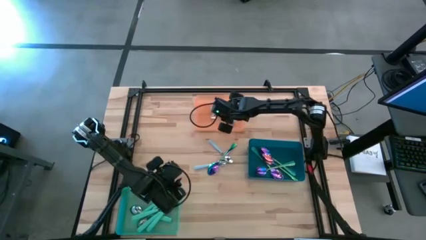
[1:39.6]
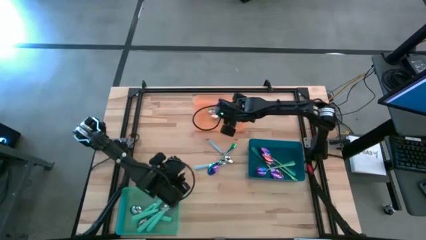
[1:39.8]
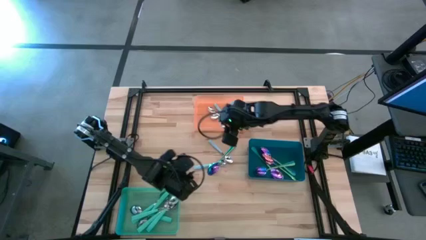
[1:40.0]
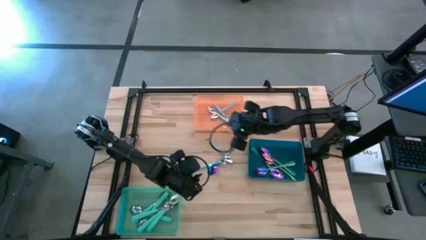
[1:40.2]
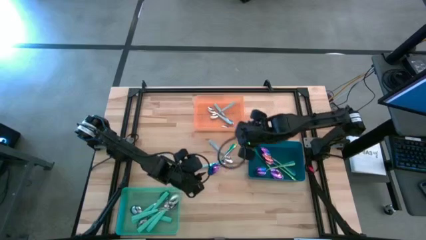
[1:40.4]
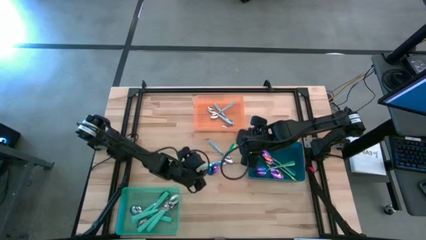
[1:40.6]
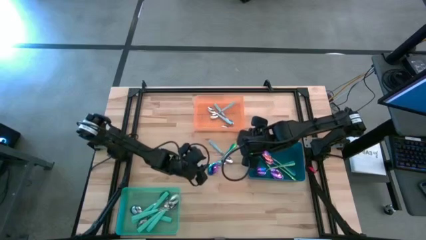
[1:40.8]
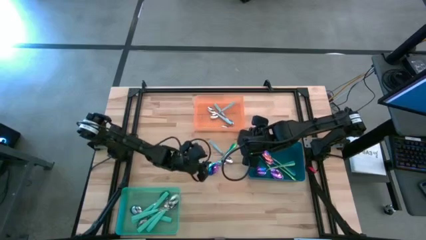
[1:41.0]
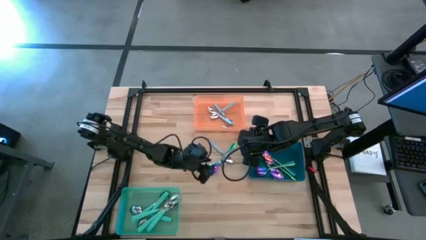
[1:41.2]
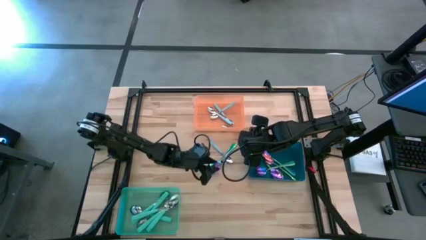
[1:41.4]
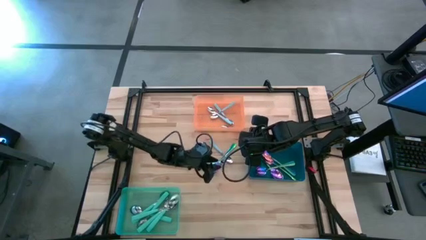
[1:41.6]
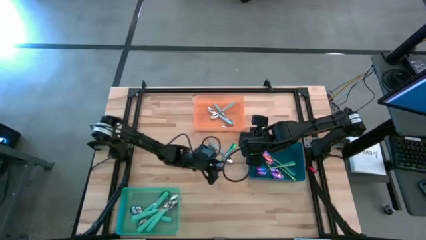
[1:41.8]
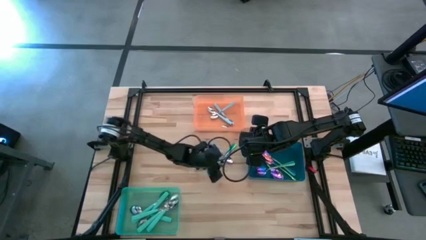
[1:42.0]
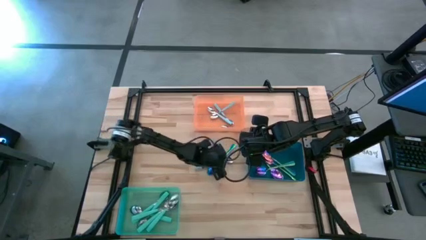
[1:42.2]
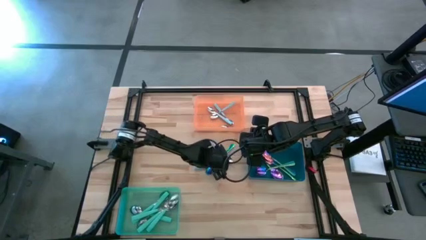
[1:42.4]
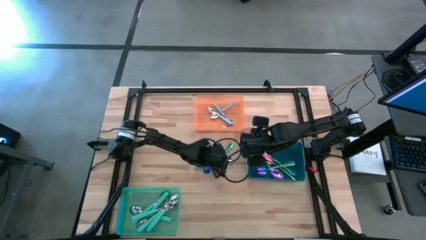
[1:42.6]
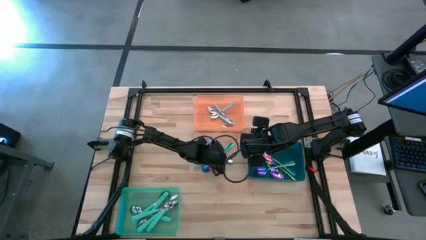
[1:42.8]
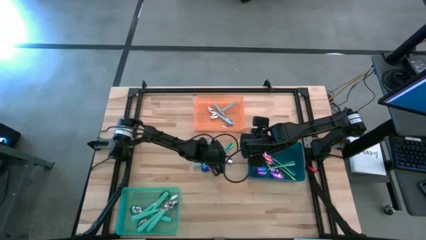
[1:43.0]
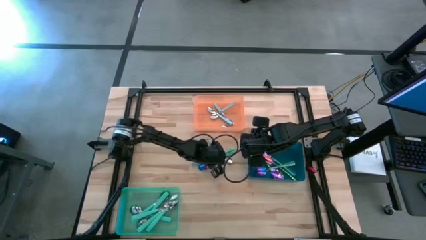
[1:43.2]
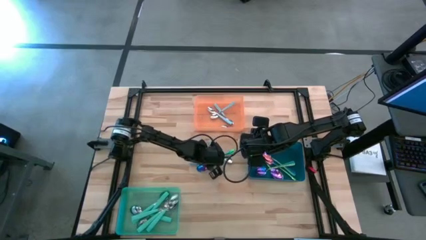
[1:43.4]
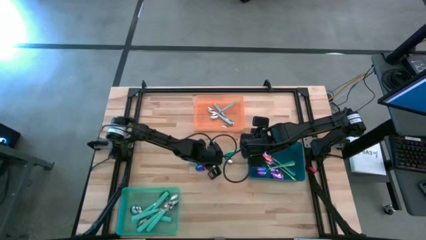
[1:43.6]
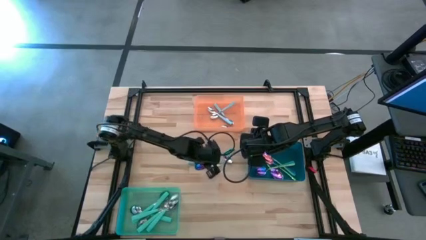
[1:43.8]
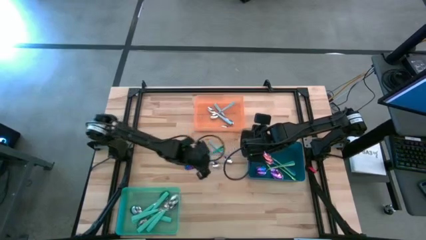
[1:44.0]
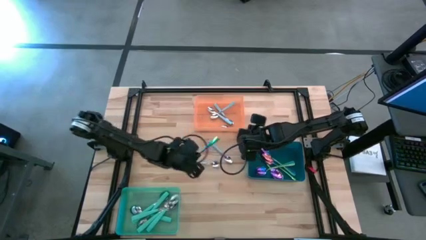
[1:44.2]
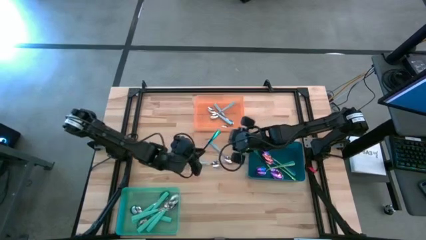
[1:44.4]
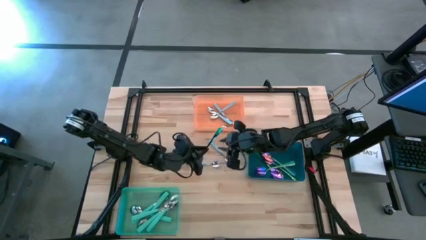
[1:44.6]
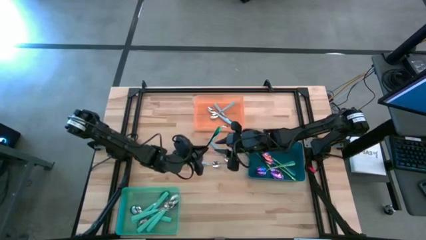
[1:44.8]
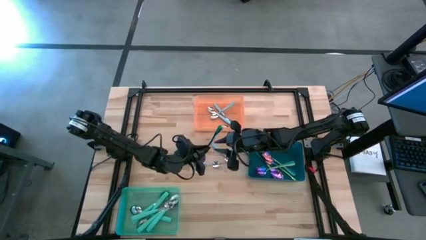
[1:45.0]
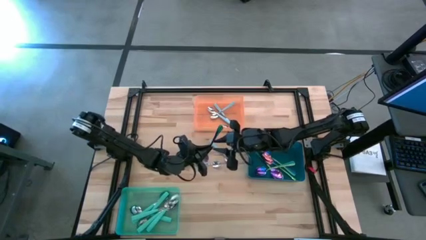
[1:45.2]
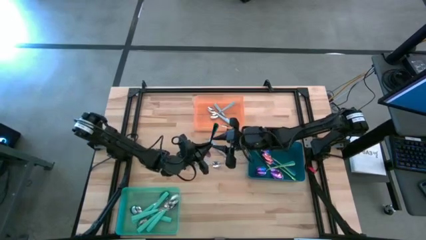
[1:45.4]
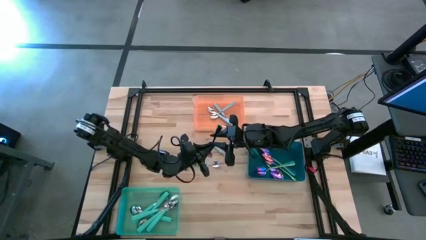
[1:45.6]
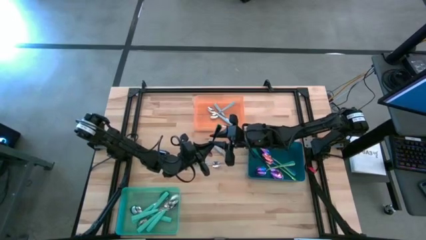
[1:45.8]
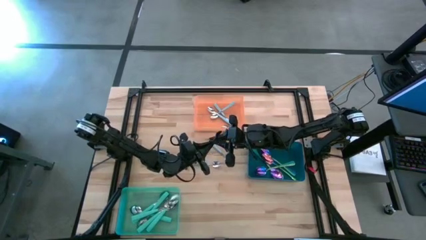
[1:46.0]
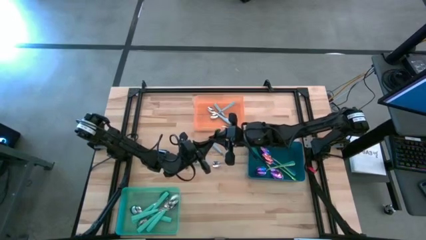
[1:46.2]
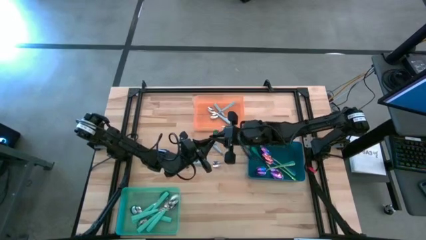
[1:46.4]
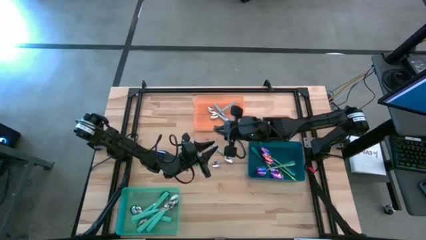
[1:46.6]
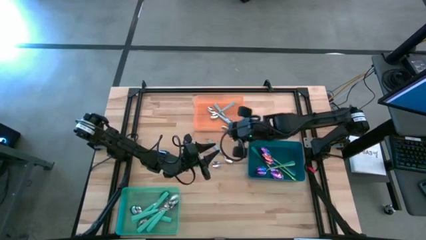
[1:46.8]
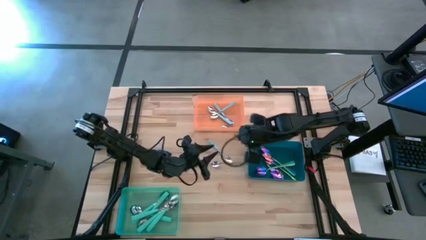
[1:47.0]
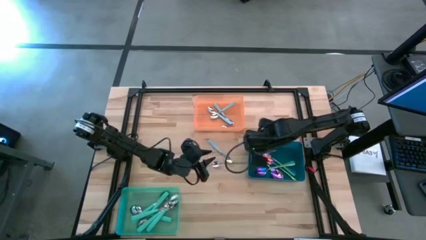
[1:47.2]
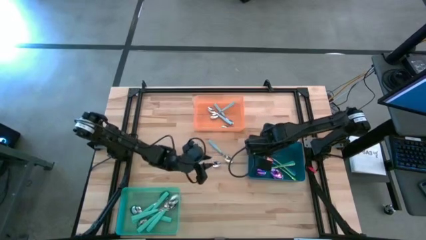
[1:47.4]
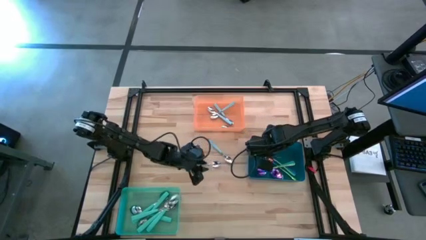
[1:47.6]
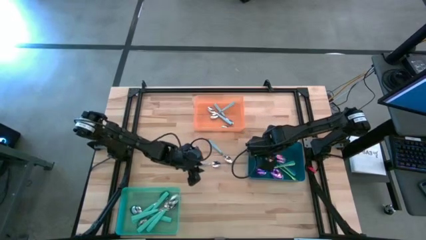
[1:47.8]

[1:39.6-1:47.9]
Task: Sort silverware by color (type)
Put the purple spoon into the blue bin

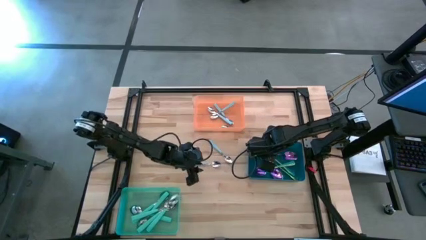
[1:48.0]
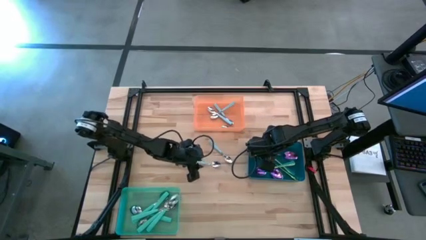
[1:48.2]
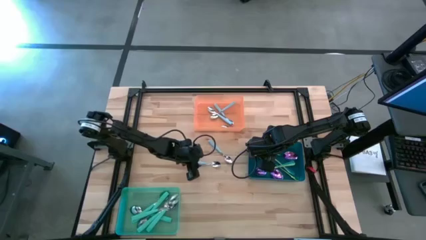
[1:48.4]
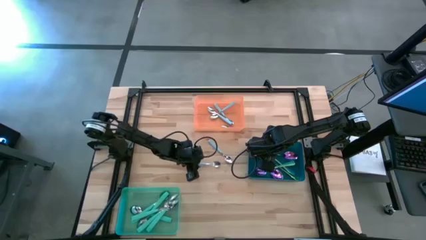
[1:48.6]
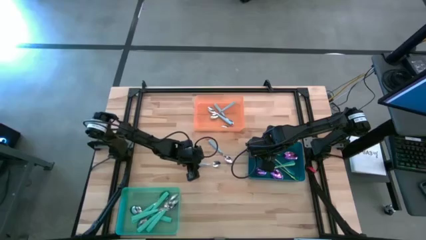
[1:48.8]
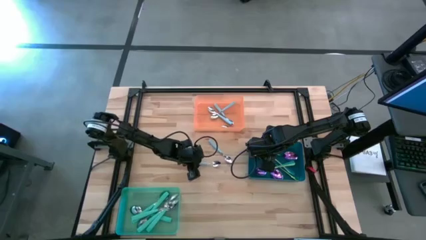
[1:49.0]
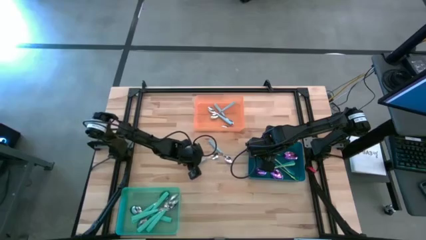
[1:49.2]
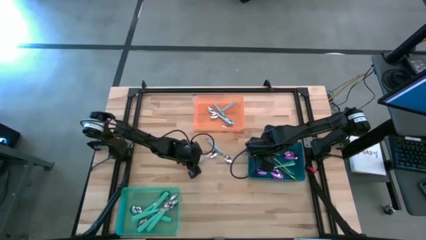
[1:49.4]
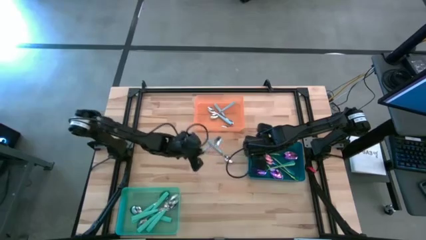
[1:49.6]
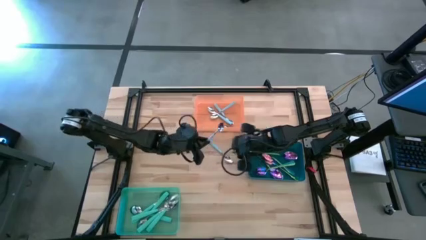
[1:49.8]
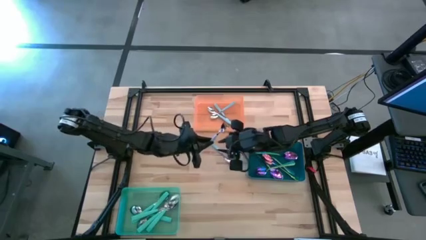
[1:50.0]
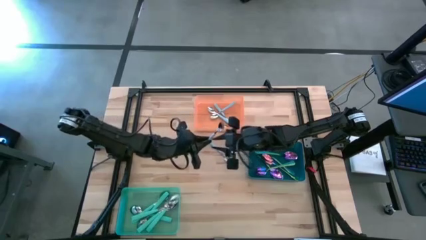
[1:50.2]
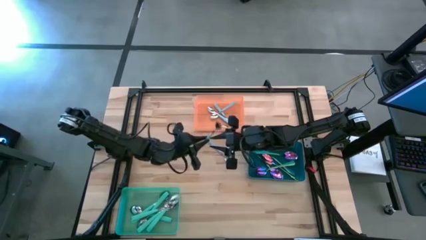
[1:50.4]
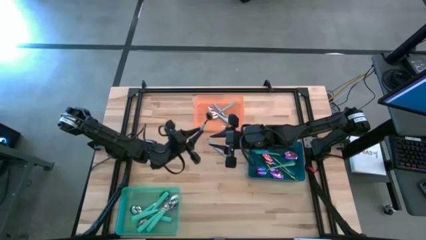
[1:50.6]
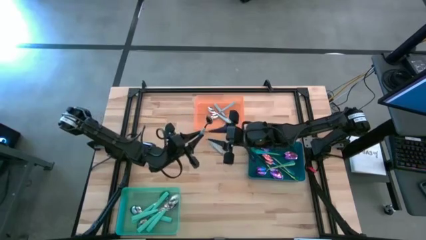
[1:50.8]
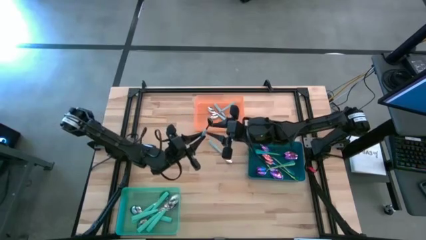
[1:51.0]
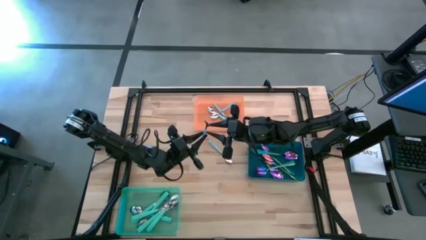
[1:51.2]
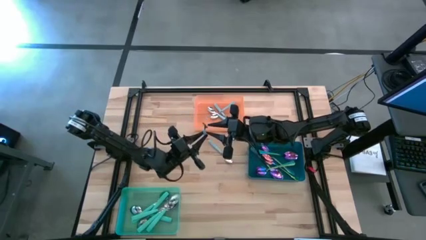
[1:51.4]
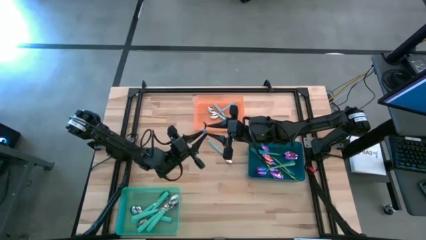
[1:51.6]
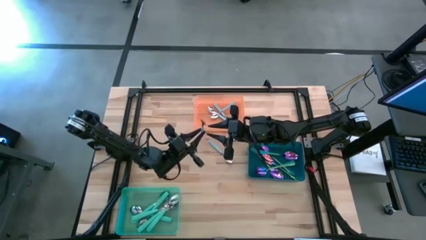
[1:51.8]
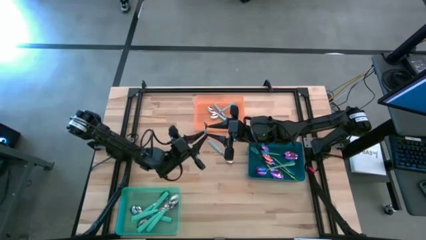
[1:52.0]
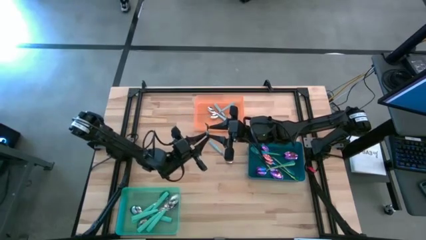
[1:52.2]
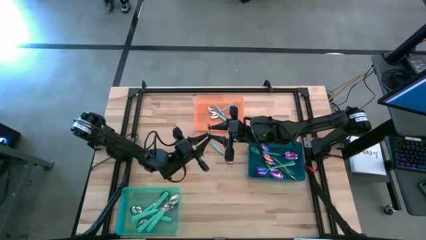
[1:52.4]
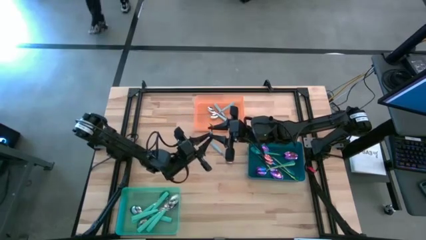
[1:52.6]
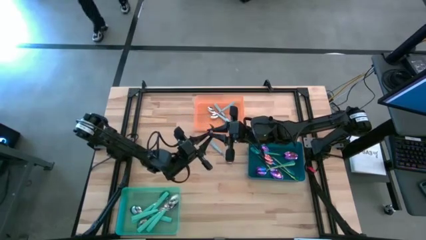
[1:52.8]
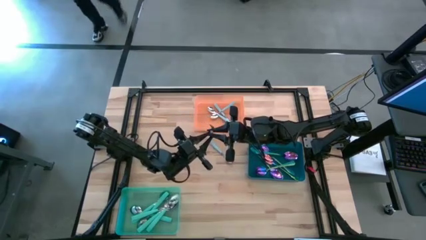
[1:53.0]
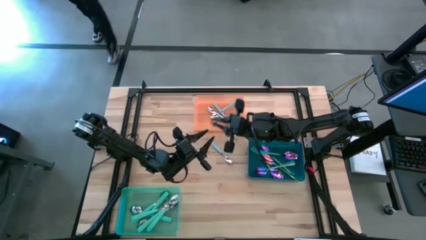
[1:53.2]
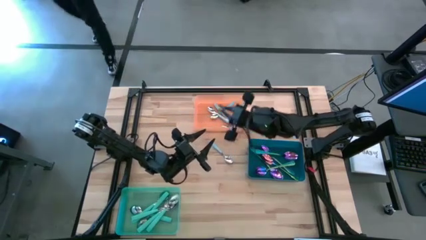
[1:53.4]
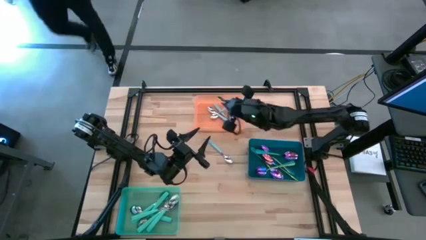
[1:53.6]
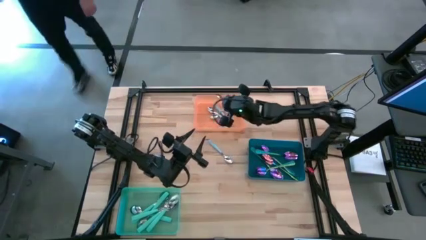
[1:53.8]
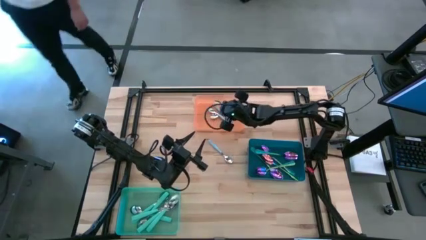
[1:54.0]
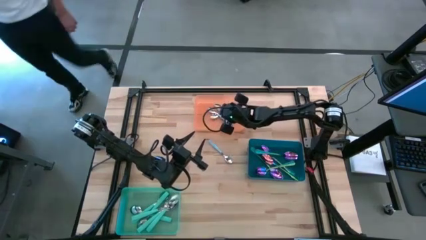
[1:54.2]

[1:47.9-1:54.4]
Put the blue spoon into the orange bin
